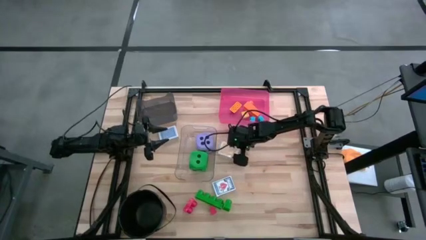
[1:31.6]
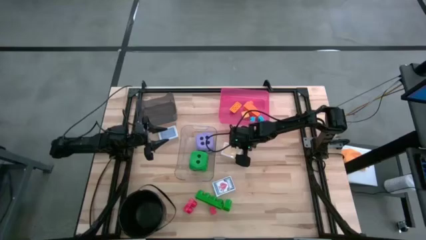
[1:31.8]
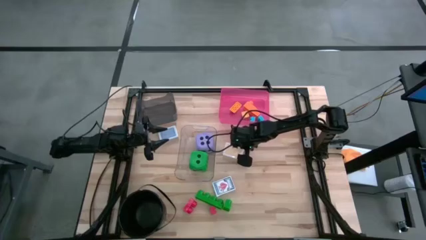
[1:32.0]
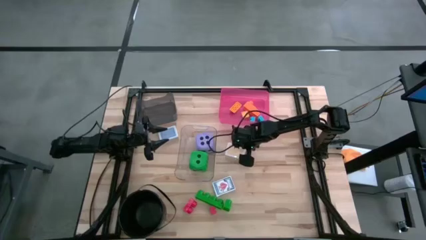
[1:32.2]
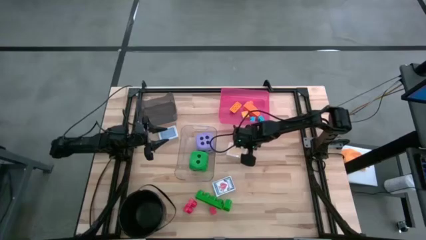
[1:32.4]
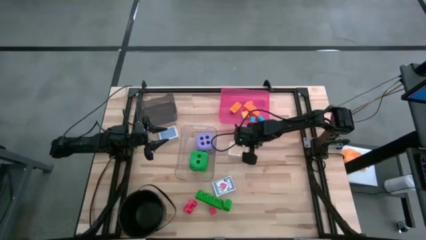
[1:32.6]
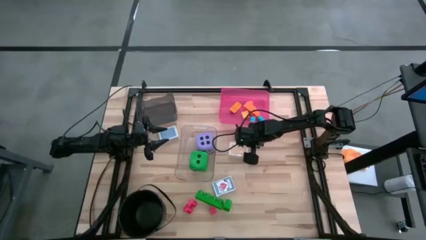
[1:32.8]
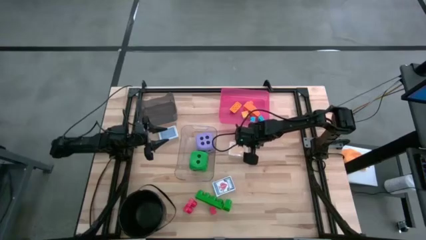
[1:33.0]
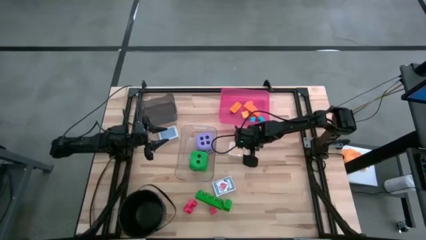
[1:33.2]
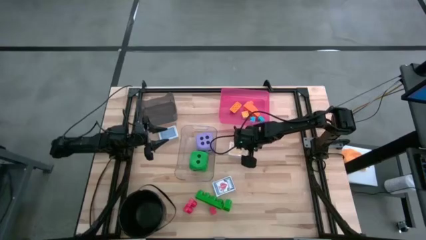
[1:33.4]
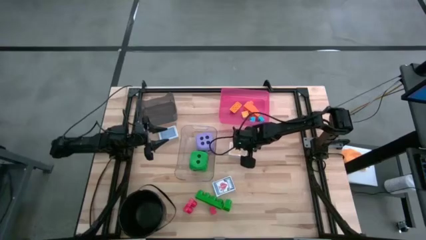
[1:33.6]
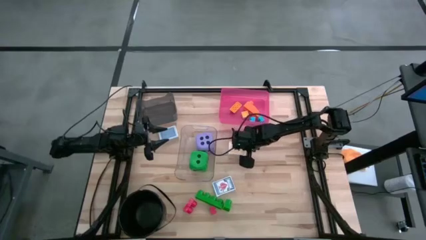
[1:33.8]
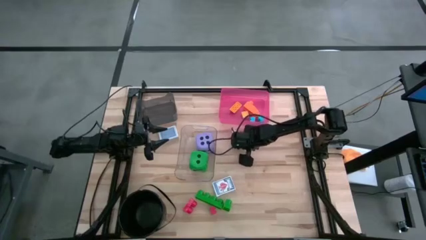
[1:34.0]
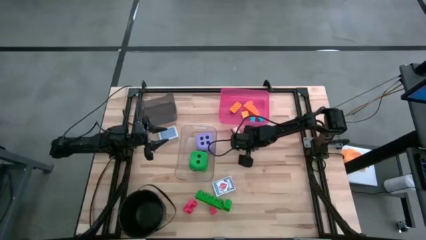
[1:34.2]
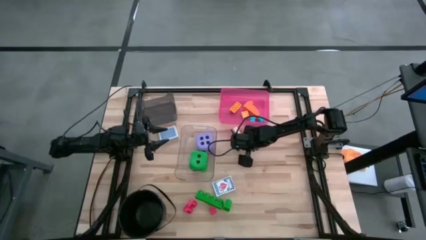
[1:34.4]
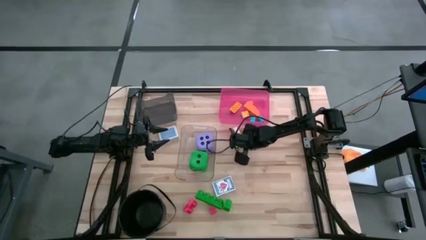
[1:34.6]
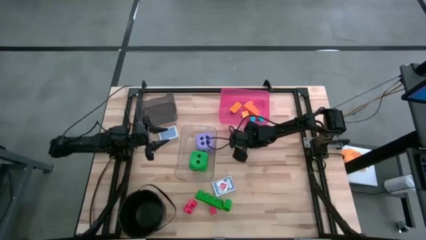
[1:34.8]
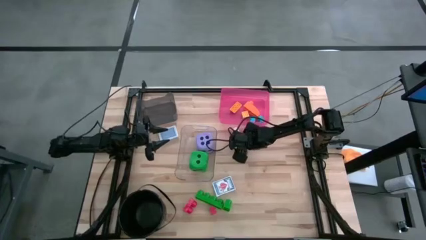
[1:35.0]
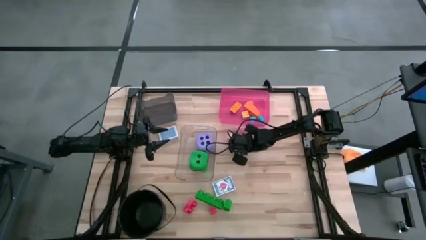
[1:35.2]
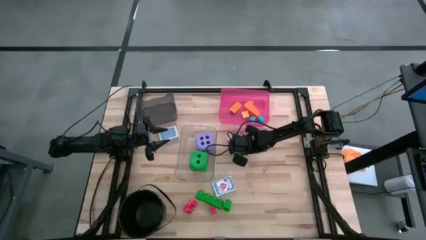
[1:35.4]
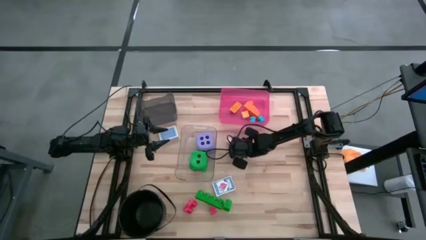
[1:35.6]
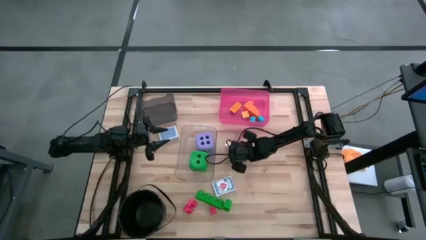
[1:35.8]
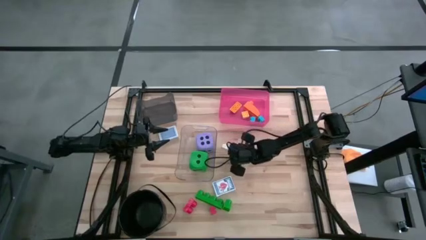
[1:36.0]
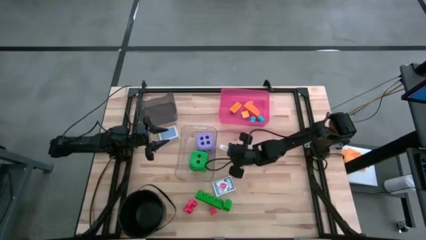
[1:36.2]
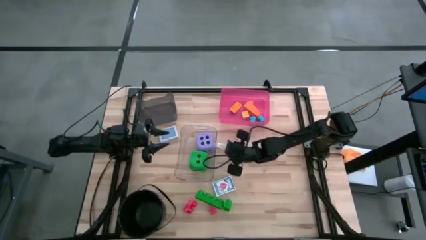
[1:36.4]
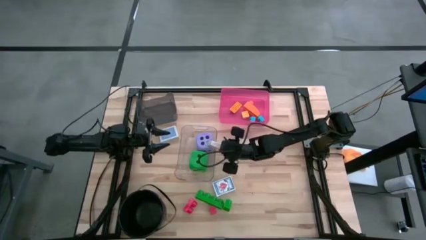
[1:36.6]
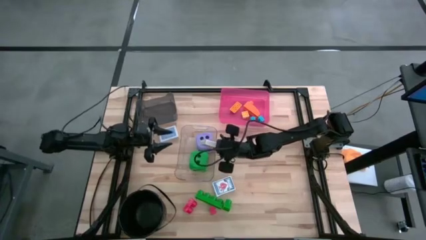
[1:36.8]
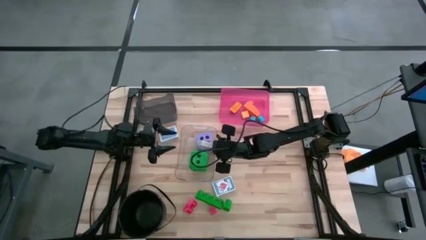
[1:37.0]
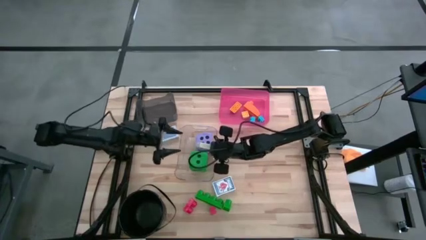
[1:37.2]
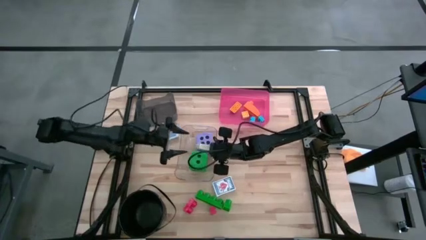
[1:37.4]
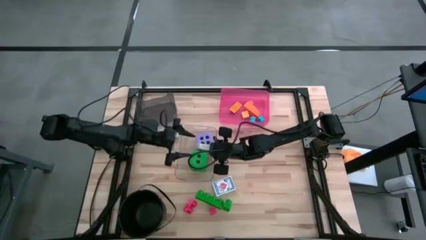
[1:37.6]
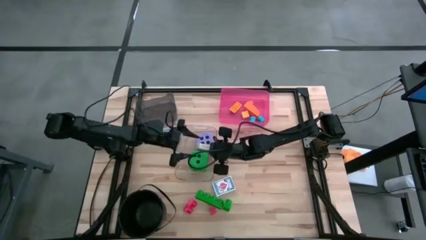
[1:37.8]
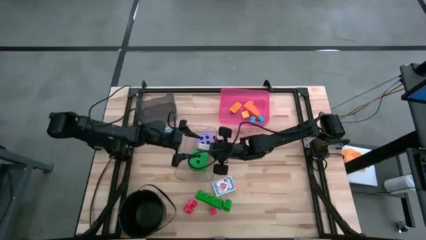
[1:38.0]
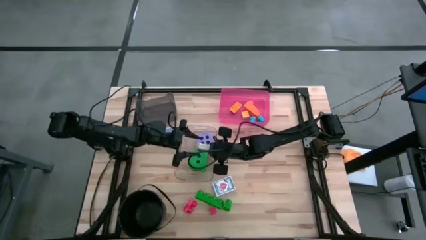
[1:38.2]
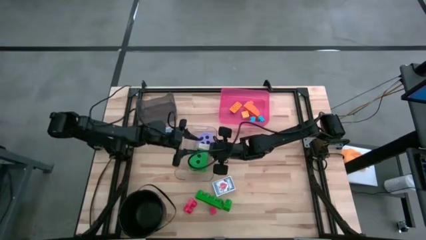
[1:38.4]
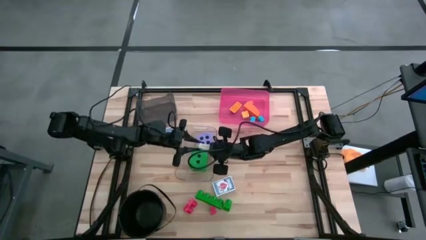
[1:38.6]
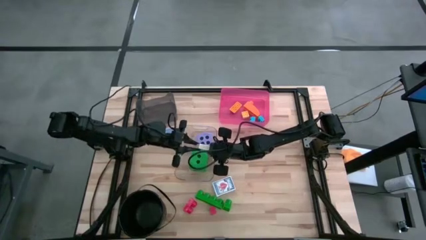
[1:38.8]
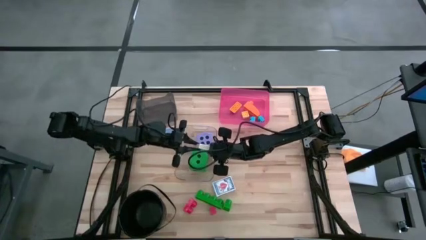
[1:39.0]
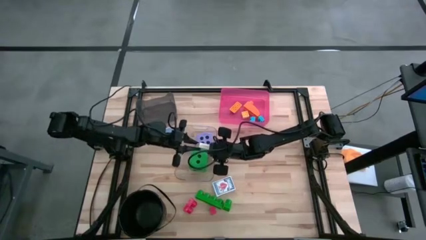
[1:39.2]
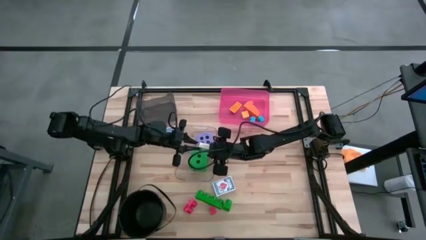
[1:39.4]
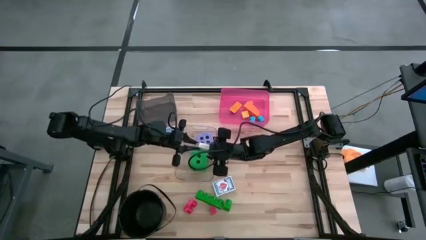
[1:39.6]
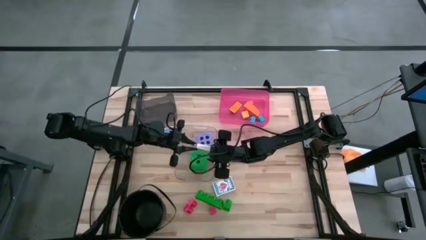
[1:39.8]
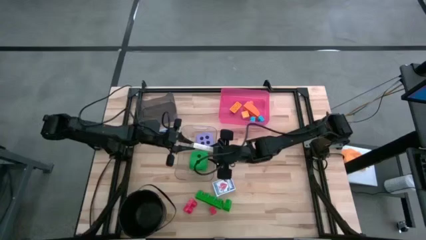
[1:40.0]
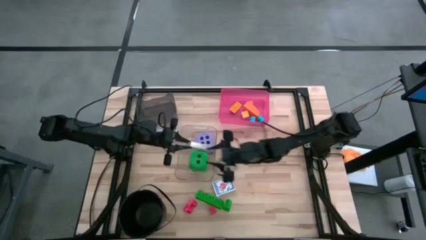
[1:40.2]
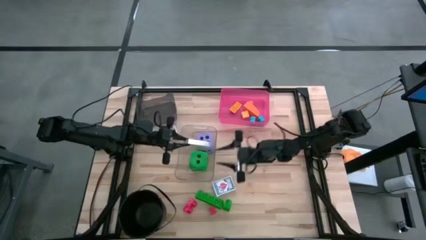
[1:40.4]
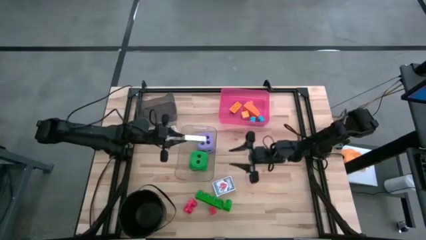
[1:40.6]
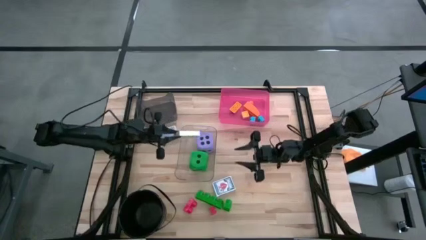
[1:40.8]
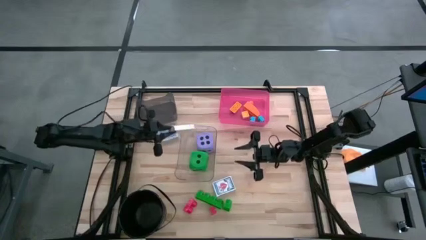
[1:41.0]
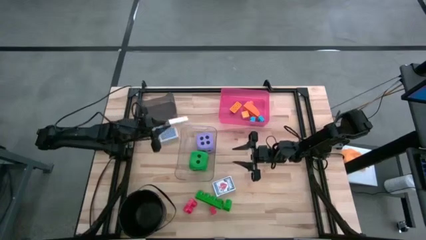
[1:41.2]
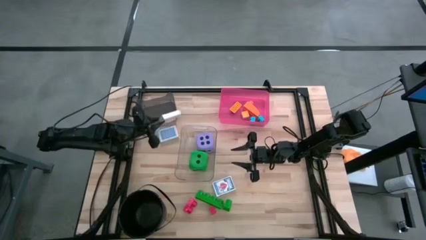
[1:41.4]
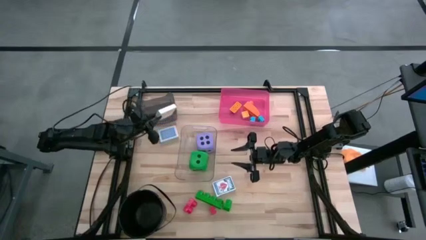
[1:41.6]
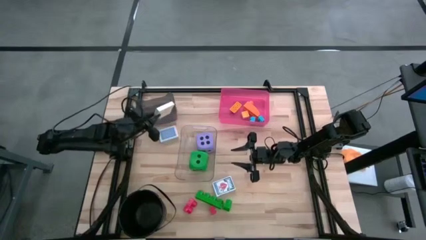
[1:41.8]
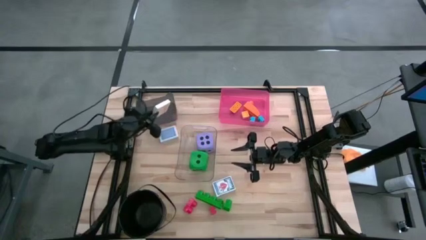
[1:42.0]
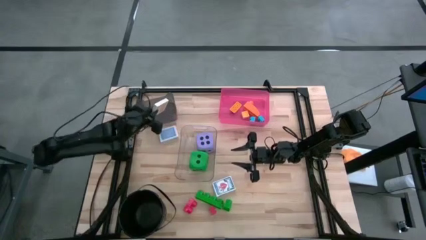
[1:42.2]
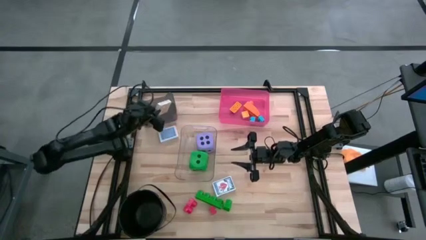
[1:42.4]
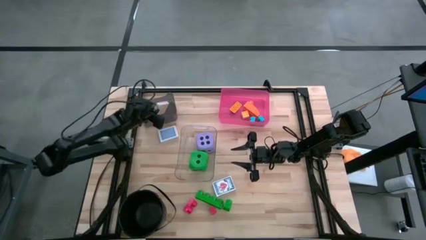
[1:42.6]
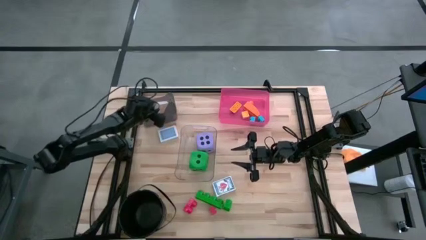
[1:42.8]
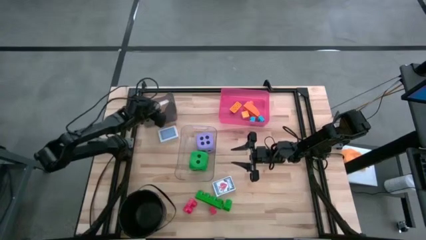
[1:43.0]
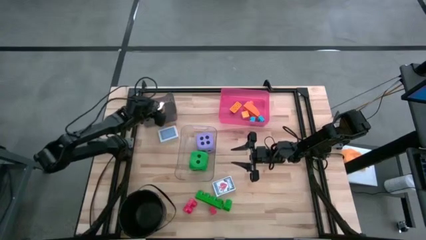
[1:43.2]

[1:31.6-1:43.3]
Task: Pick & Place Toys
Put the yellow deck of cards into the black bin

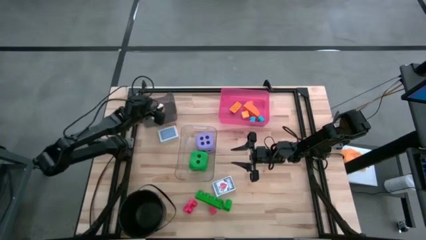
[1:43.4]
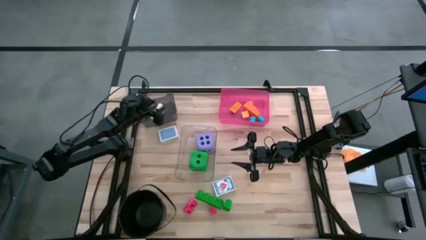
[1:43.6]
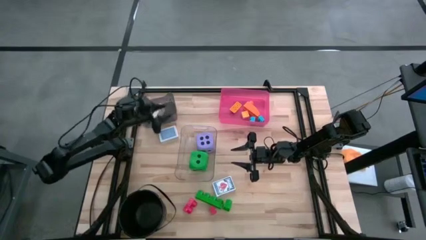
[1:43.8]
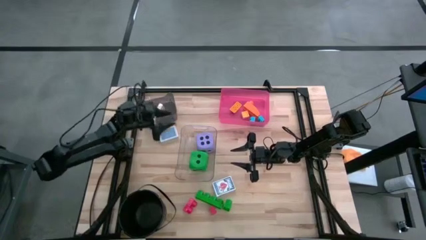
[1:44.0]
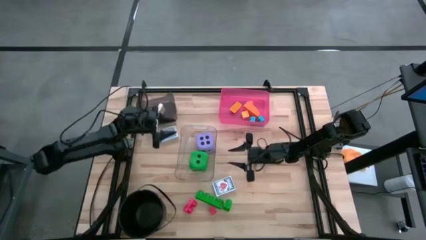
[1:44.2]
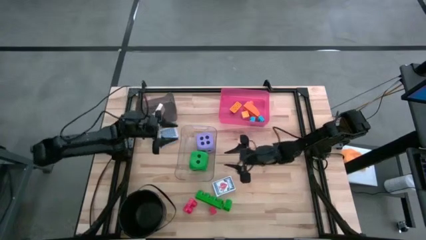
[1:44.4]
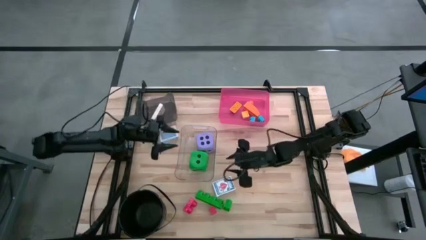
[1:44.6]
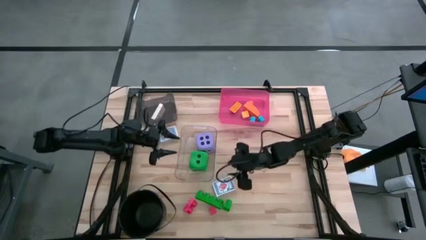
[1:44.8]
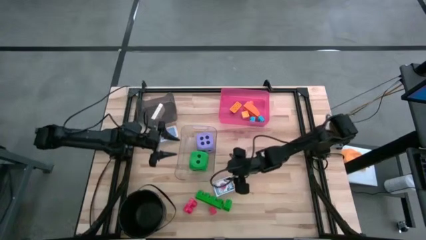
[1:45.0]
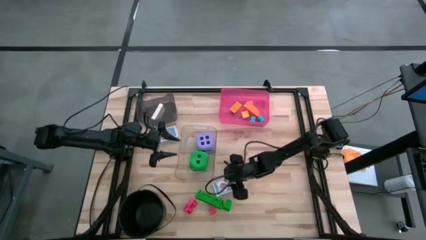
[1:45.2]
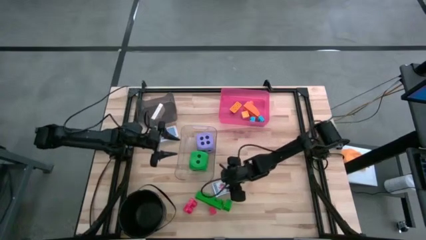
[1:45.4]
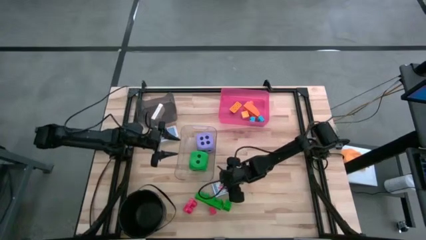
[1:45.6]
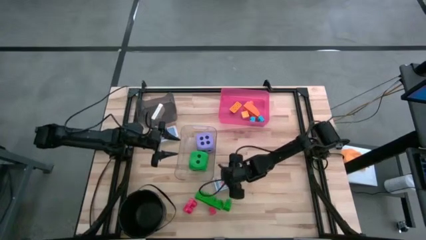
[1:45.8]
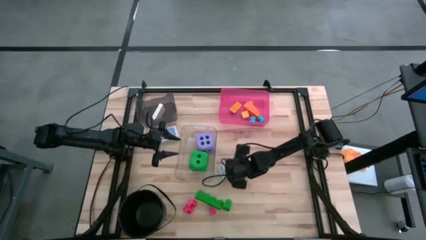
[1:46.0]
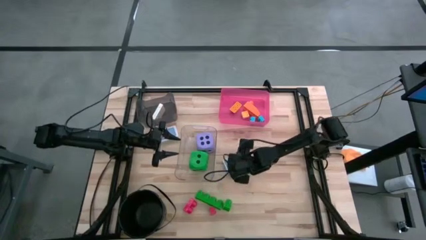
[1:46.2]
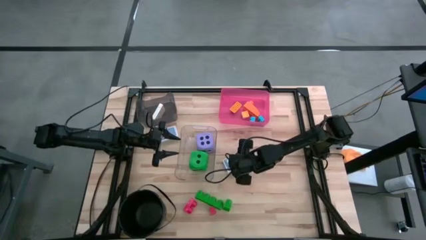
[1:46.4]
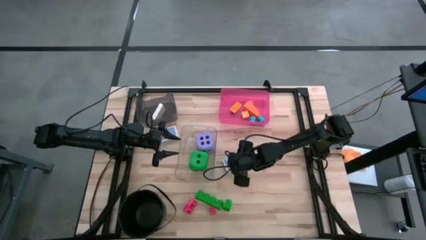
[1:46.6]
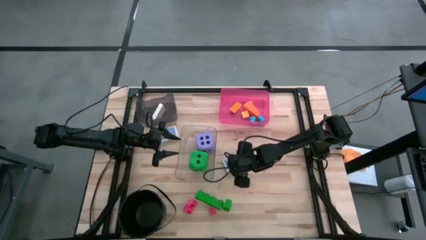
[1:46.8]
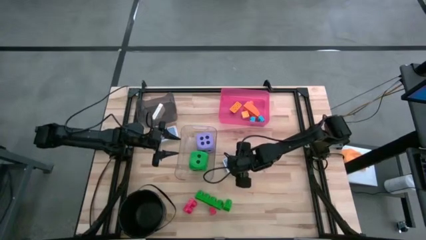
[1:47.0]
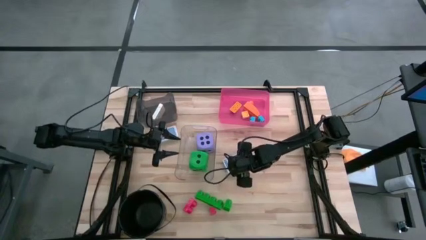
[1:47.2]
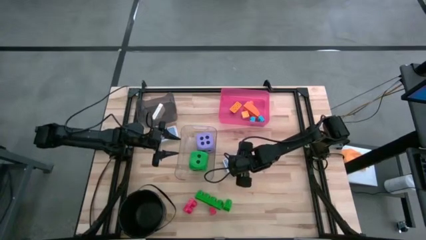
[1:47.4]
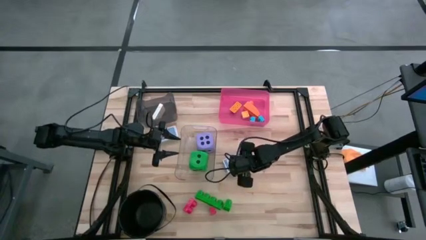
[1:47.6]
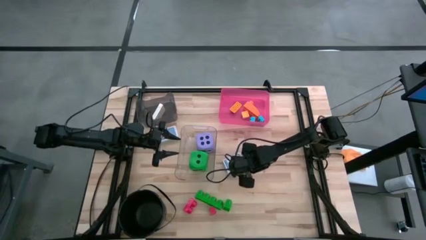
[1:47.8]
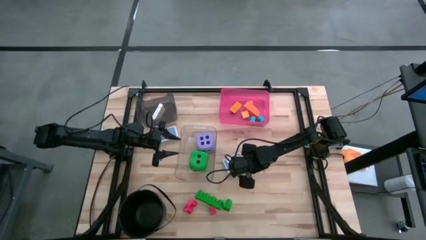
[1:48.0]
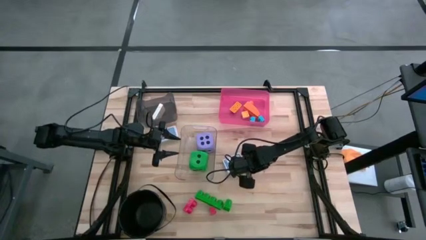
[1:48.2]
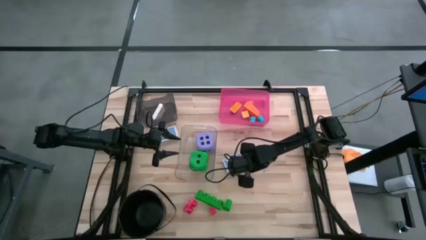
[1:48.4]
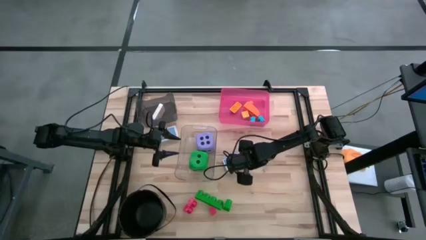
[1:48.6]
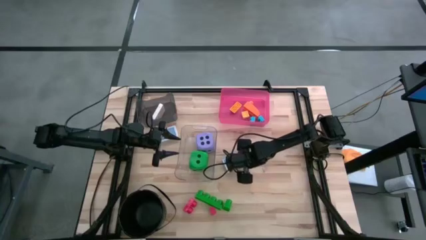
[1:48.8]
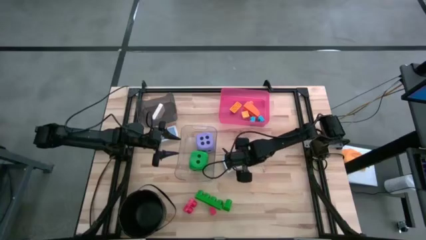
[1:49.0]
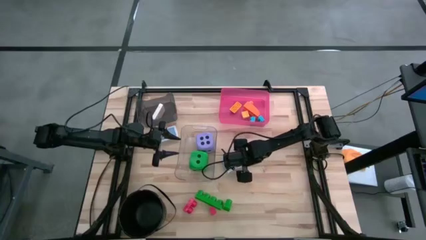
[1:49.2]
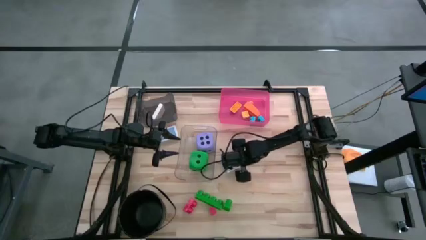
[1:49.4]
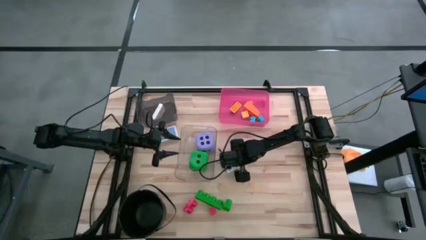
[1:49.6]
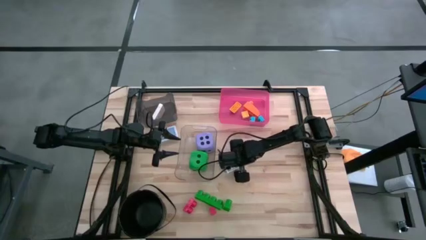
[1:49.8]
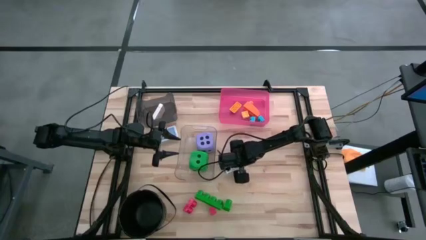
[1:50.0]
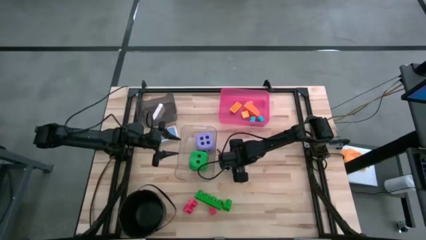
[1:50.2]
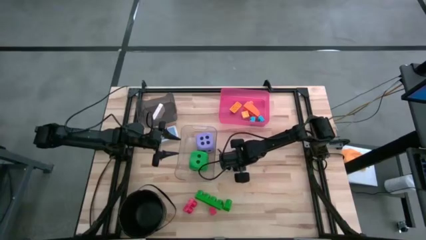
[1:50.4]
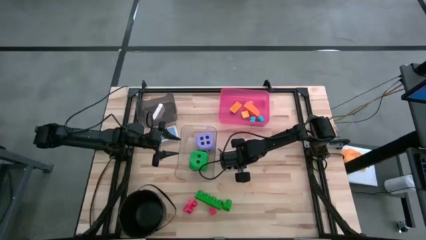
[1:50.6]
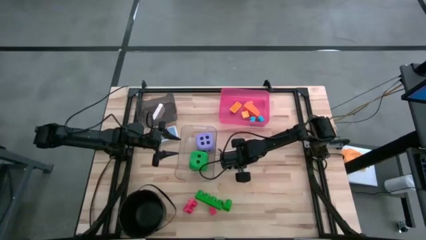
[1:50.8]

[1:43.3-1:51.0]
Put the white deck of cards into the black bin
